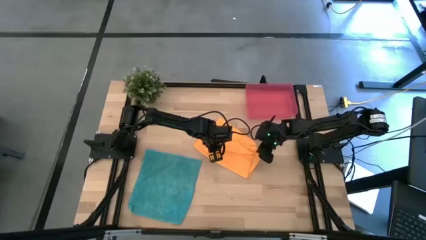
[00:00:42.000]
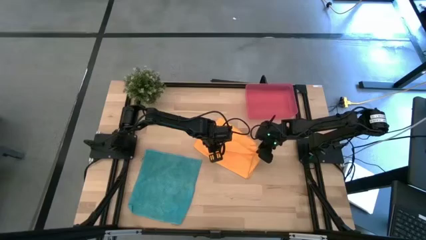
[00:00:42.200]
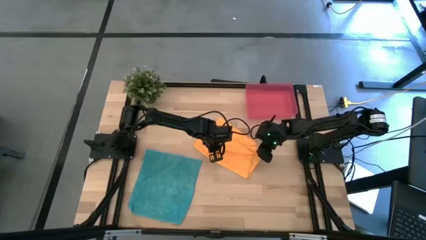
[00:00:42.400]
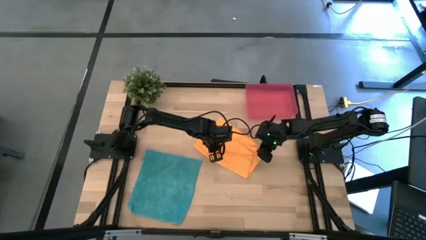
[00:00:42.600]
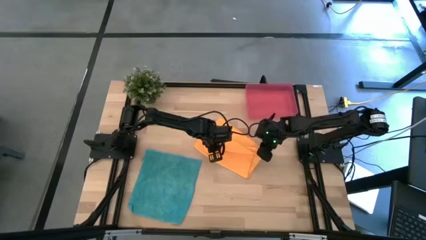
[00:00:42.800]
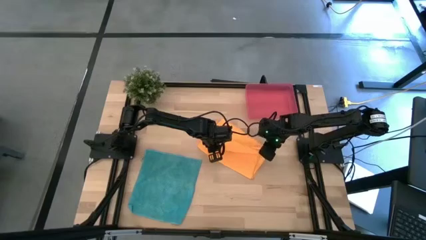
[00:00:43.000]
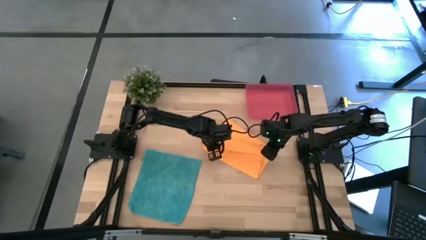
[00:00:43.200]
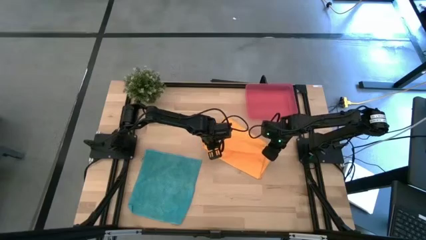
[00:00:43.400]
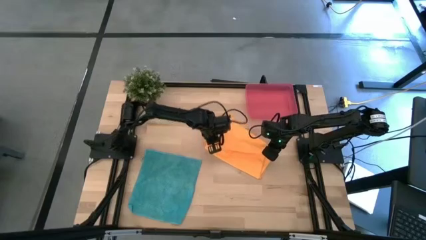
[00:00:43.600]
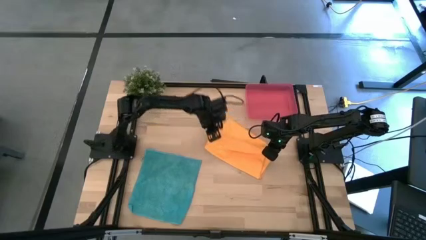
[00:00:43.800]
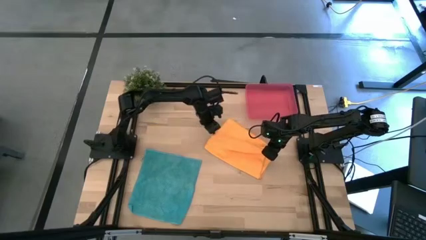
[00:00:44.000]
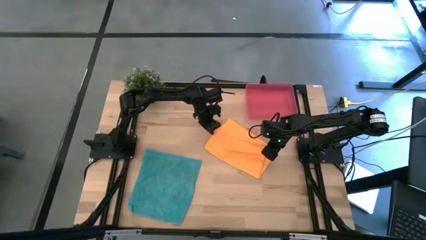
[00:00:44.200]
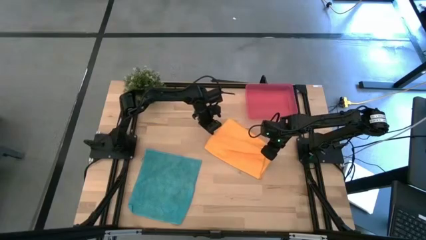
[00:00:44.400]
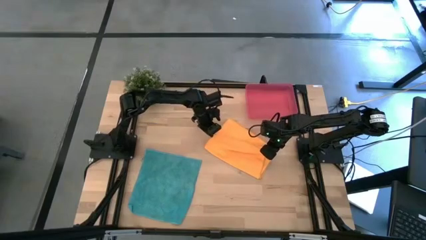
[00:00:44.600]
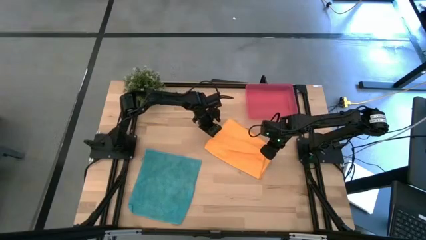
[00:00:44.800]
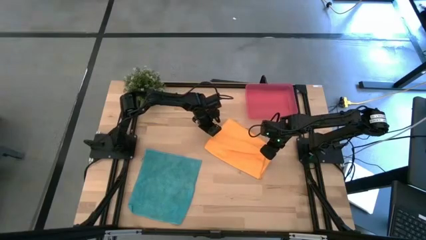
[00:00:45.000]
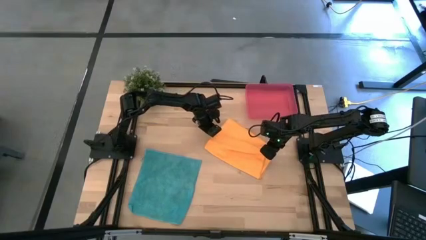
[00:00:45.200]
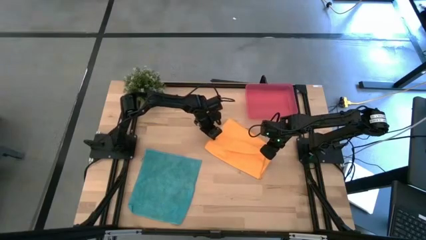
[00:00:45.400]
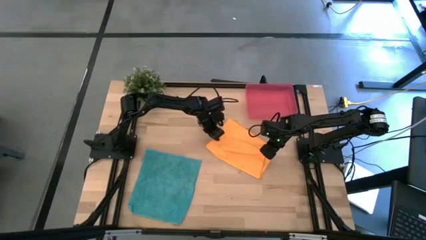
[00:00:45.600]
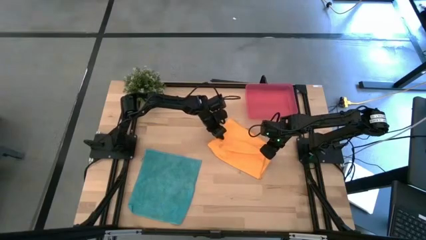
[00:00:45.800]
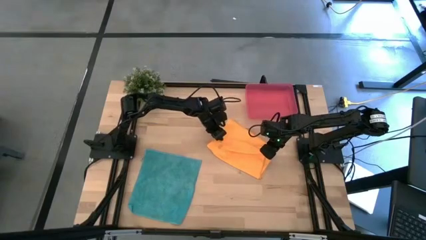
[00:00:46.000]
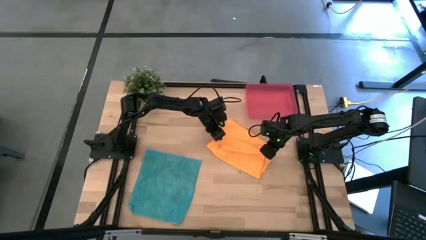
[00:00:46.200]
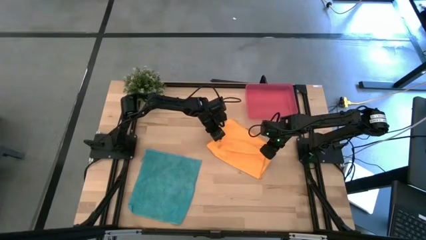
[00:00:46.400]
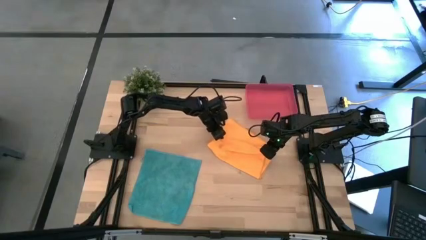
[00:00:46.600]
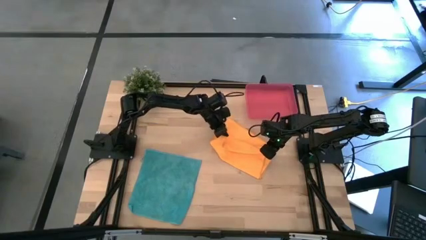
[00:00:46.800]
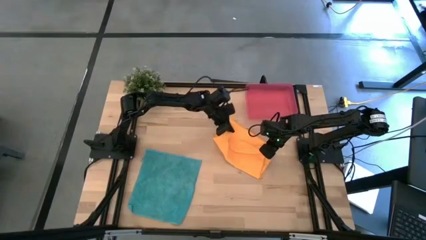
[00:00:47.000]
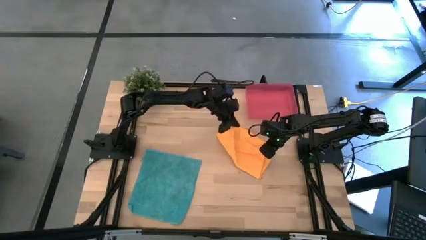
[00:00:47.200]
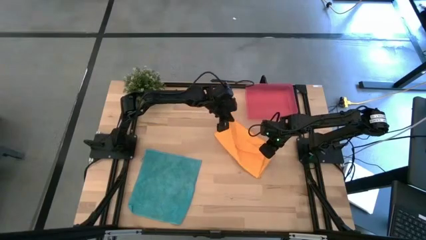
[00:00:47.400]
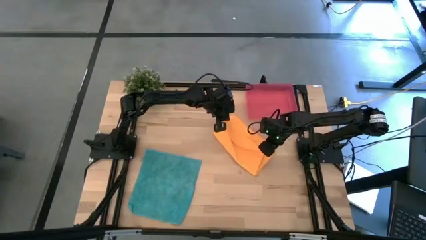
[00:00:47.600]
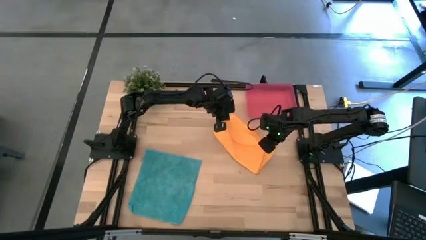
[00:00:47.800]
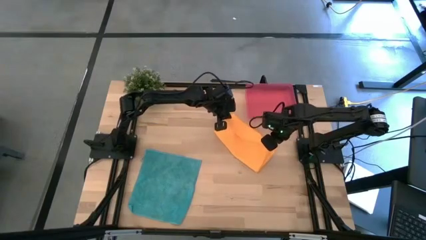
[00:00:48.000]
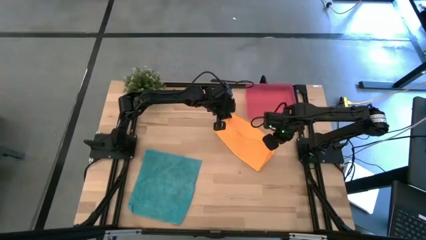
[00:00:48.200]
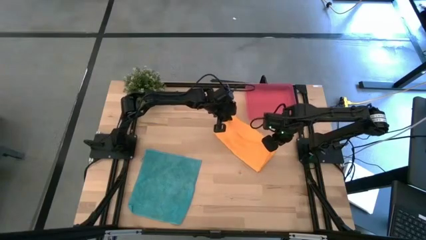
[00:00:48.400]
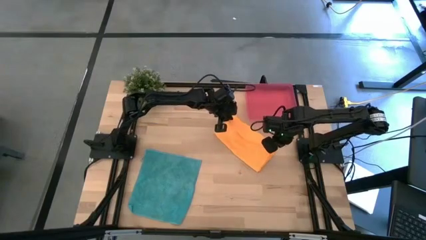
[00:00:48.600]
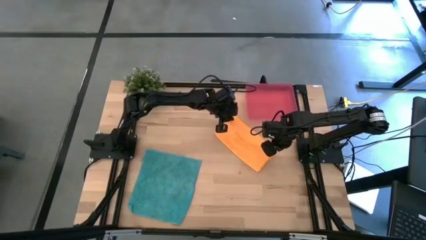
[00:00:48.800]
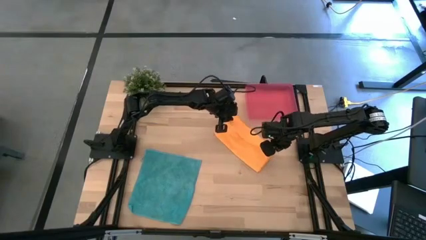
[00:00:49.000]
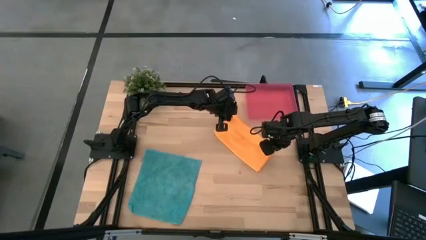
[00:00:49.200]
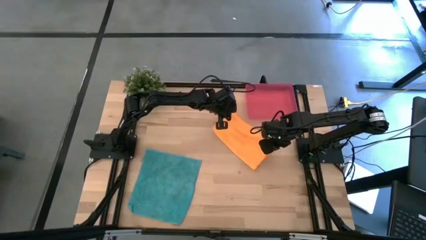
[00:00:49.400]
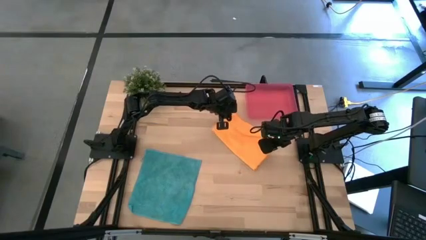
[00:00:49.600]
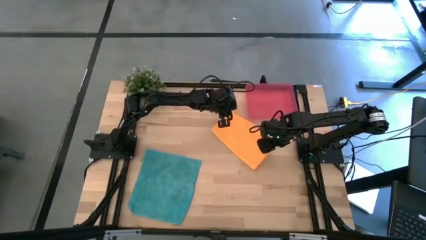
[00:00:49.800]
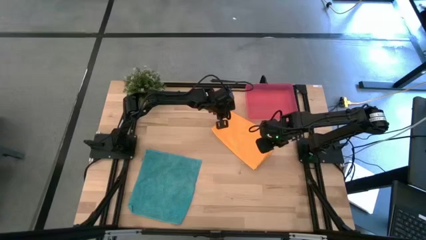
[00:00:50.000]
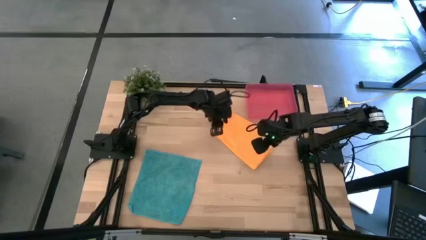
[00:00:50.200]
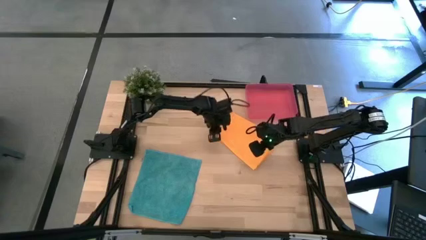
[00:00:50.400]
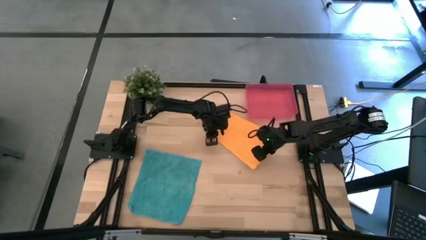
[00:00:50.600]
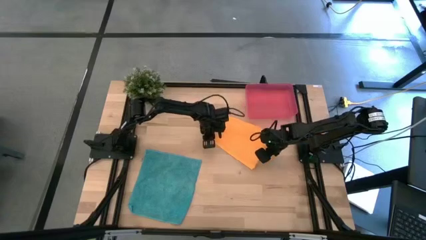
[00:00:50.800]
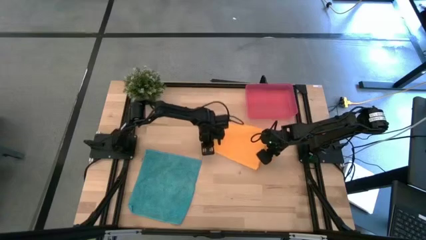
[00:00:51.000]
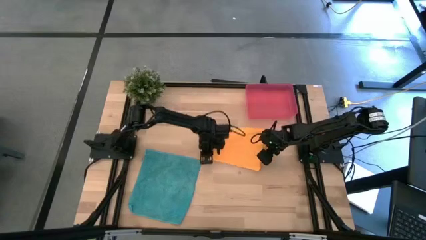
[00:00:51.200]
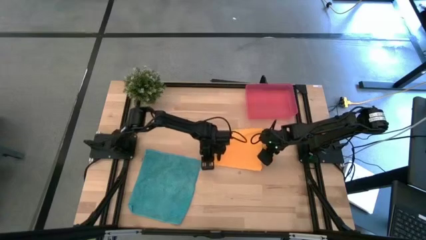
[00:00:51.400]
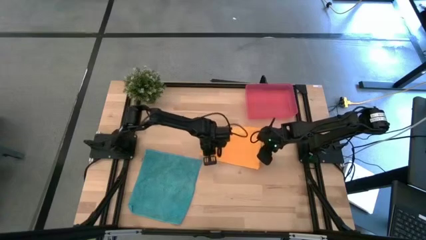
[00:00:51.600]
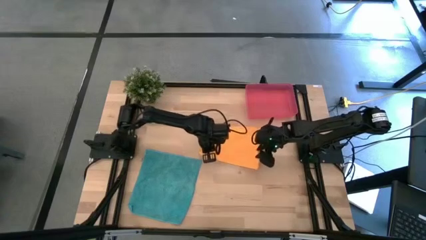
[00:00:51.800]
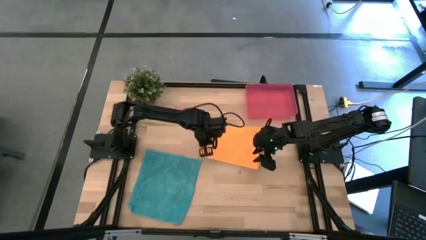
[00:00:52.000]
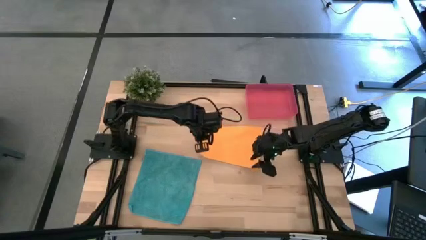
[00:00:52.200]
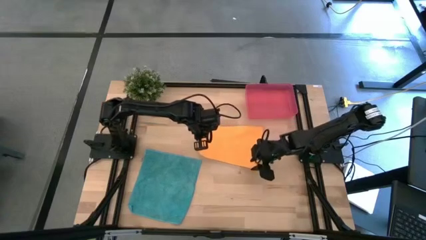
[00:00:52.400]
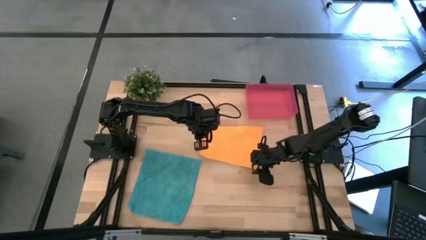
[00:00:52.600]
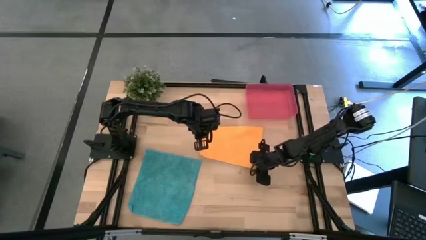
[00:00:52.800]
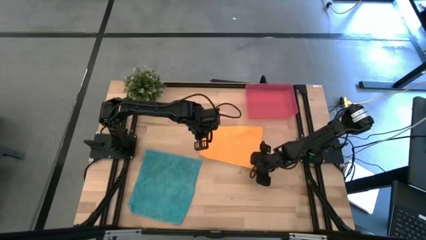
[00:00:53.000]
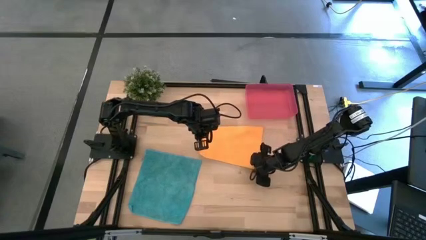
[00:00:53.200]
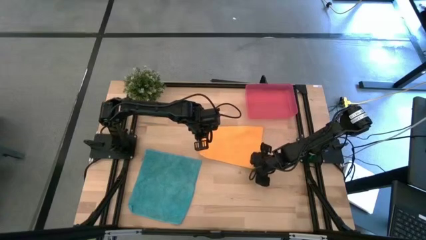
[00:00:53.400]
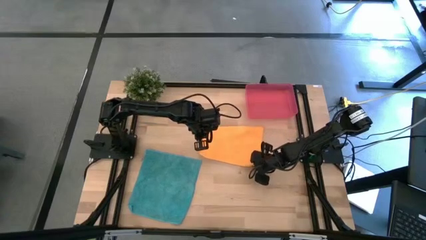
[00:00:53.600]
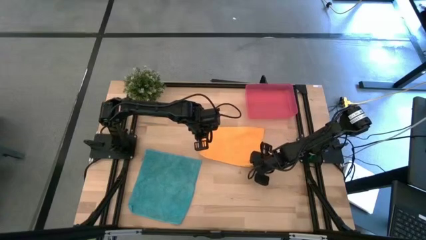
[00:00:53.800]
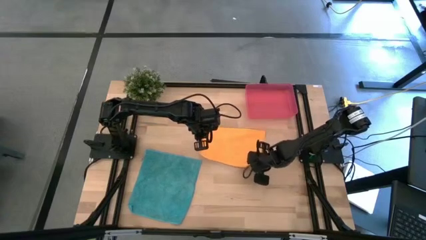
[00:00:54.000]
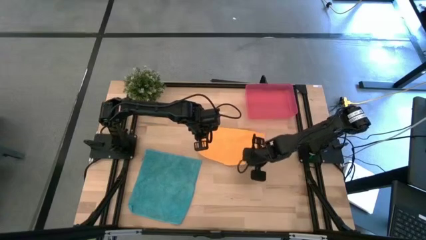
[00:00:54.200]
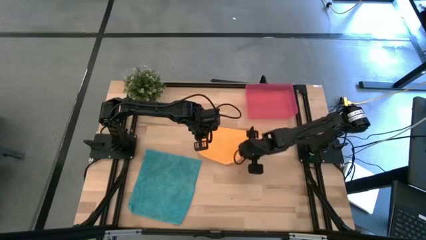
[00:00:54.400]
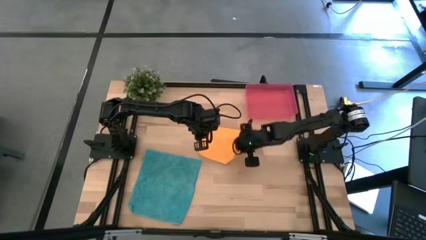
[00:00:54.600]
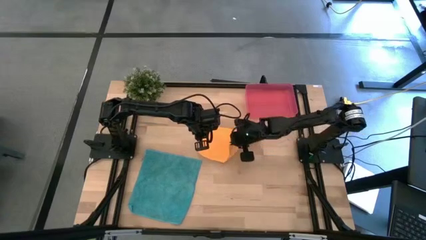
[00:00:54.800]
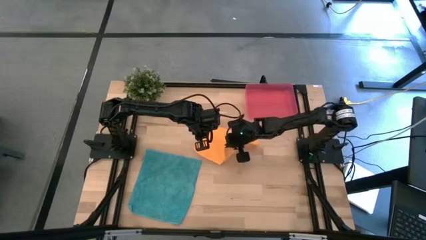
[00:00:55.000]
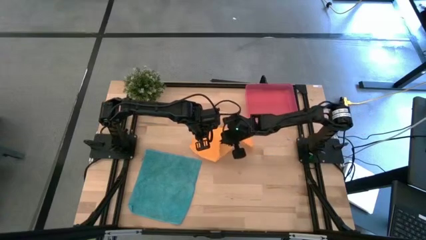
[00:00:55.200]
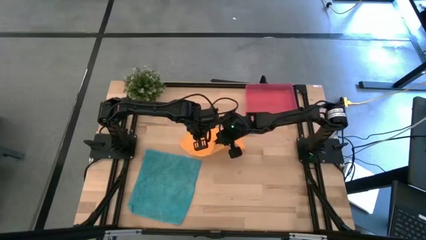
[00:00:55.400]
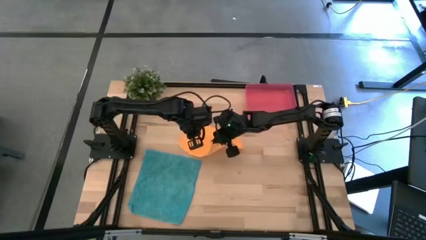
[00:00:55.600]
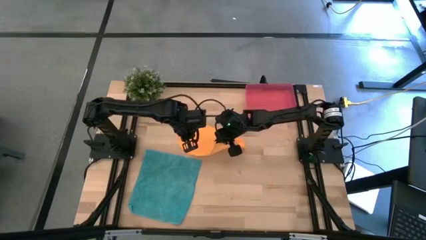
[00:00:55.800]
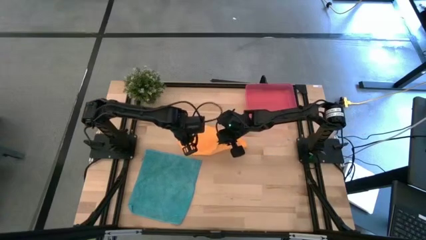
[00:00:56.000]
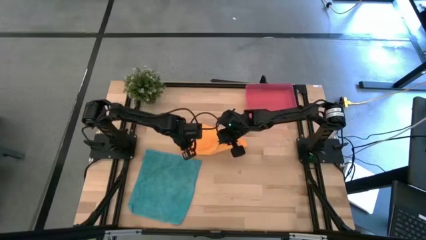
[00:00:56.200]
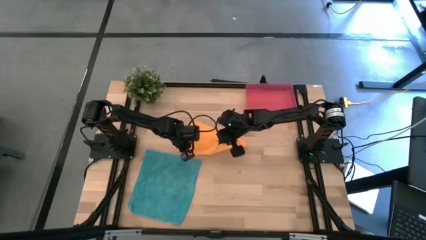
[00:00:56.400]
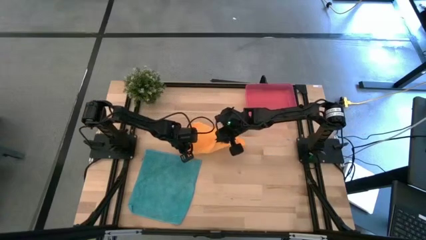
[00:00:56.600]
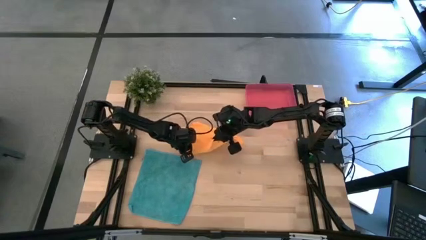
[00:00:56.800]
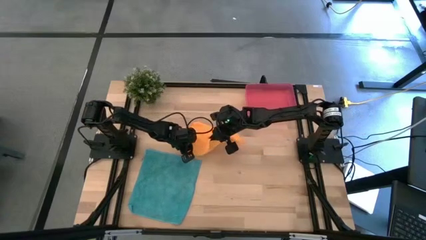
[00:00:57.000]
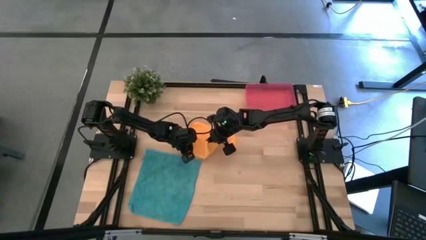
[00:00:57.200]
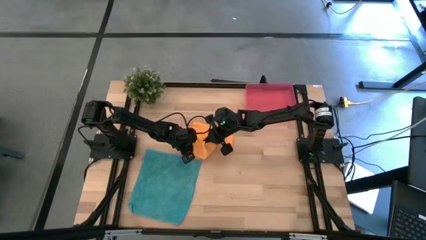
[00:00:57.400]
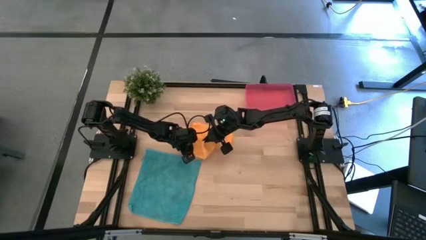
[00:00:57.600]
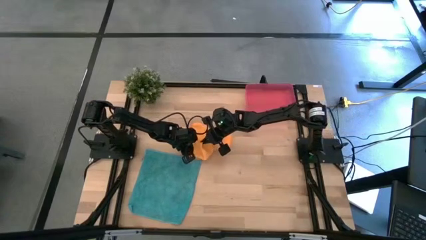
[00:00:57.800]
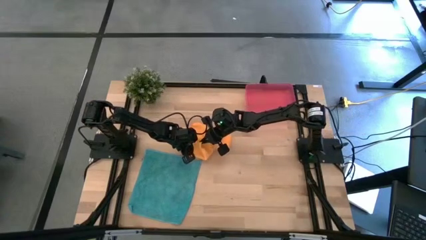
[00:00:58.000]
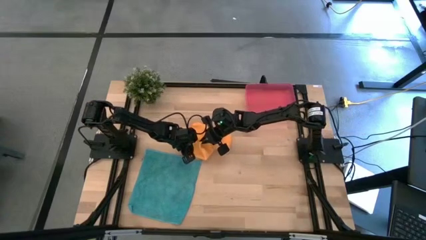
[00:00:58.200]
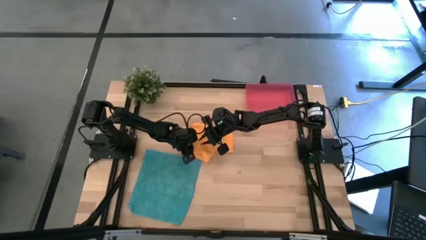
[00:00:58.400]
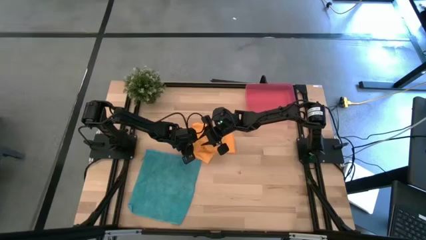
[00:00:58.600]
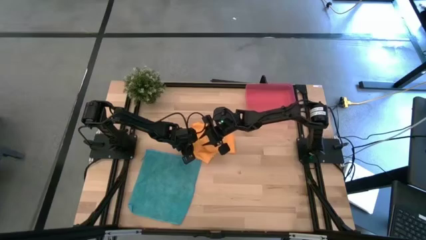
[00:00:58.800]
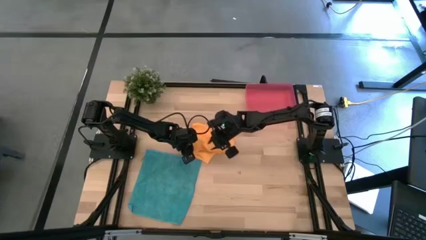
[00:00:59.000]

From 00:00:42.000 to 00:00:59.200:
Task: Roll microfiber towels into tight, uniform cylinder then place into a basket
Fold the orange microfiber towel
